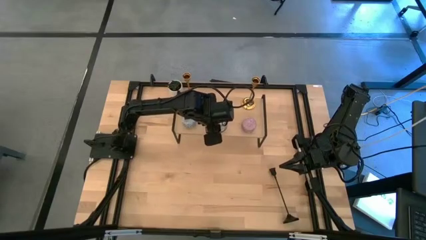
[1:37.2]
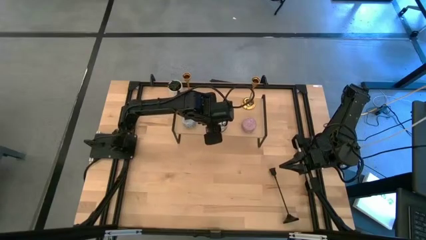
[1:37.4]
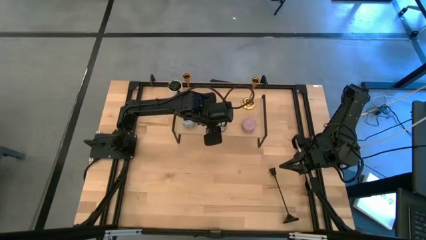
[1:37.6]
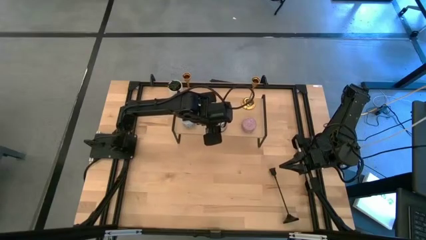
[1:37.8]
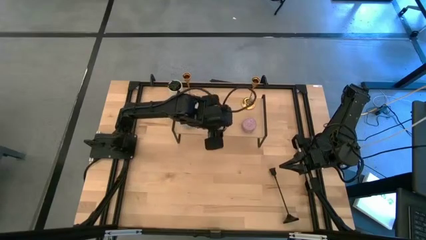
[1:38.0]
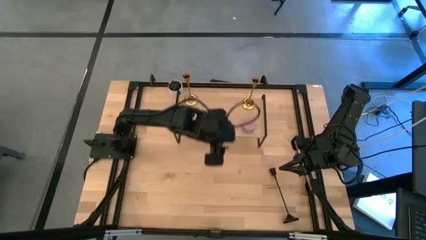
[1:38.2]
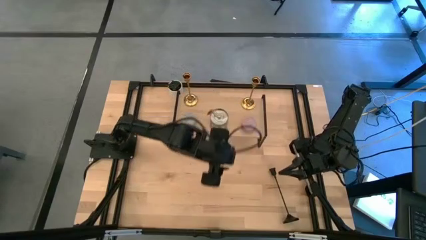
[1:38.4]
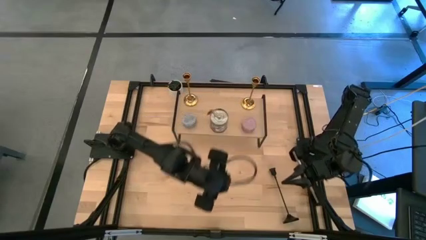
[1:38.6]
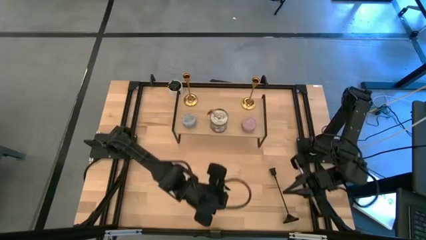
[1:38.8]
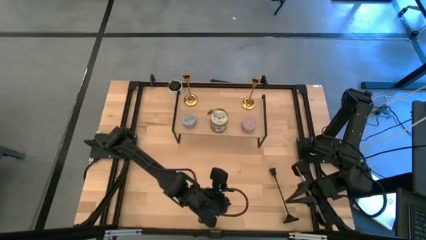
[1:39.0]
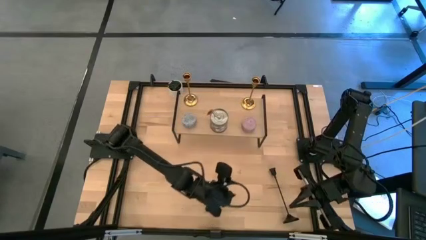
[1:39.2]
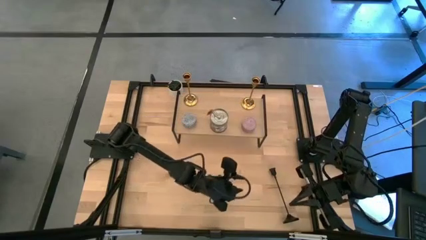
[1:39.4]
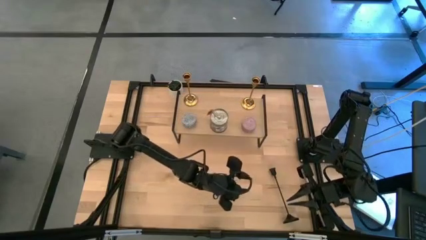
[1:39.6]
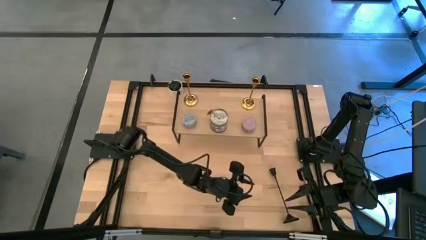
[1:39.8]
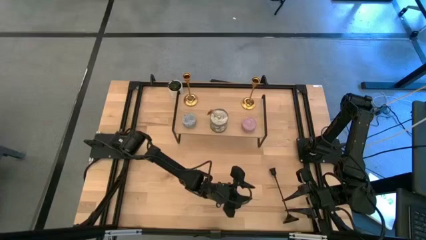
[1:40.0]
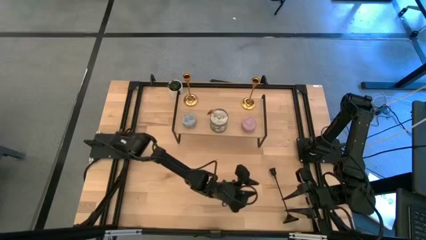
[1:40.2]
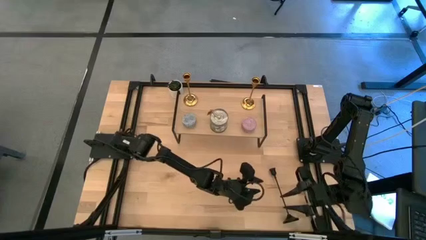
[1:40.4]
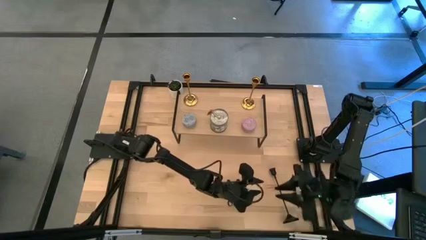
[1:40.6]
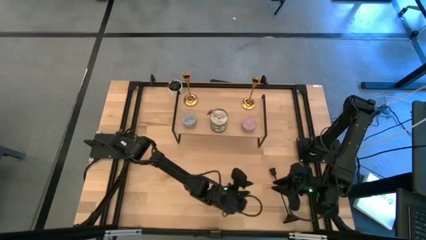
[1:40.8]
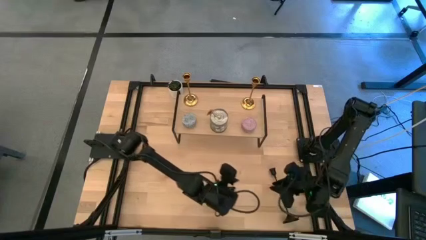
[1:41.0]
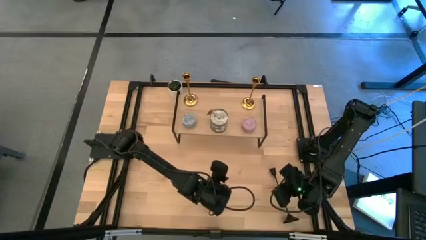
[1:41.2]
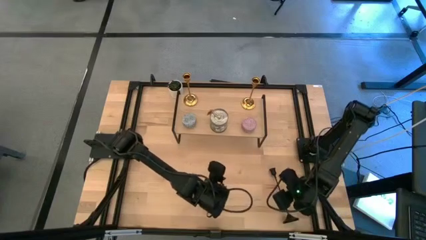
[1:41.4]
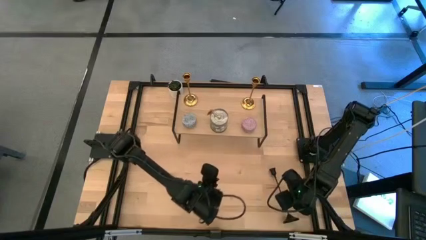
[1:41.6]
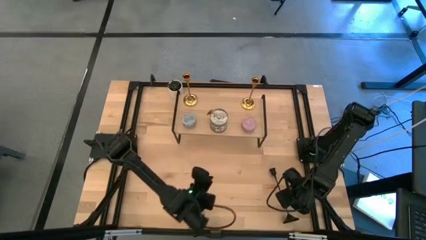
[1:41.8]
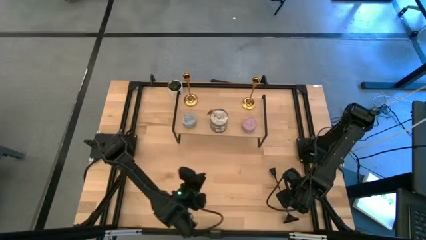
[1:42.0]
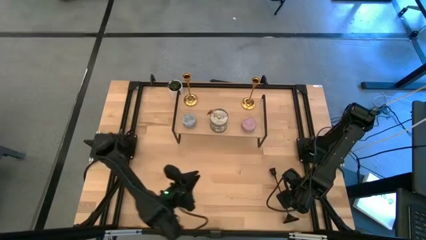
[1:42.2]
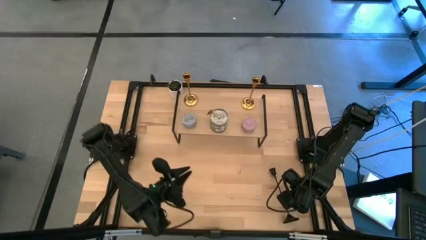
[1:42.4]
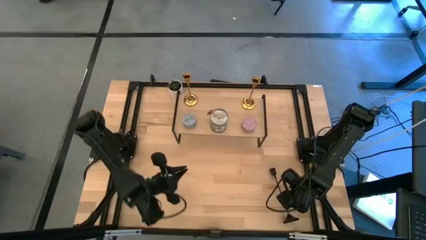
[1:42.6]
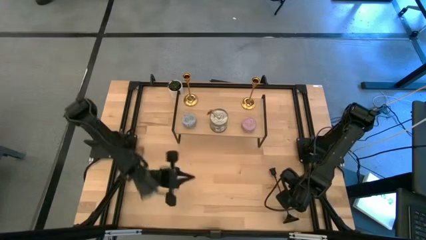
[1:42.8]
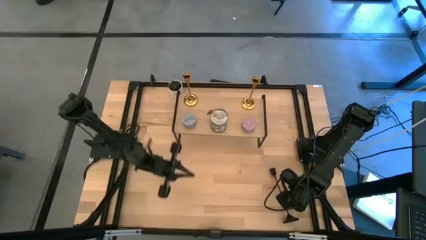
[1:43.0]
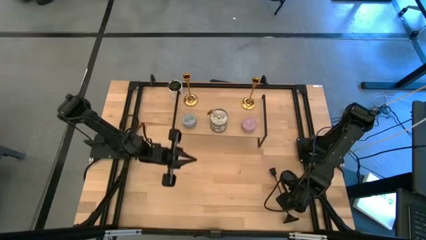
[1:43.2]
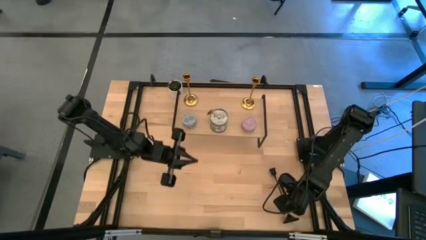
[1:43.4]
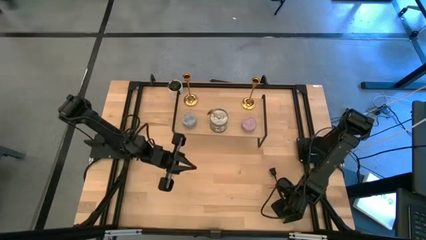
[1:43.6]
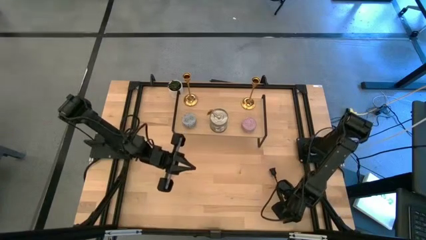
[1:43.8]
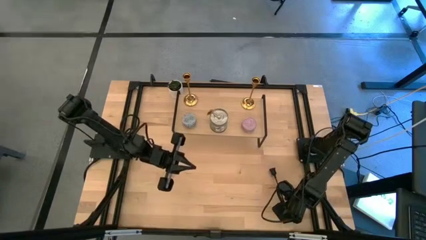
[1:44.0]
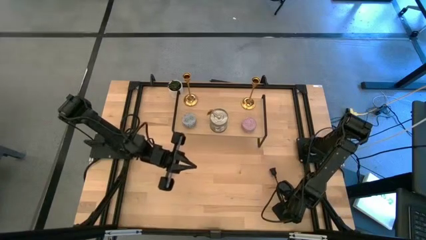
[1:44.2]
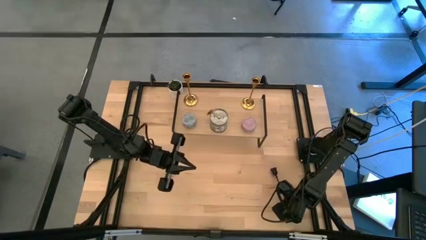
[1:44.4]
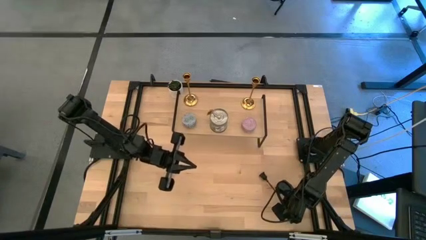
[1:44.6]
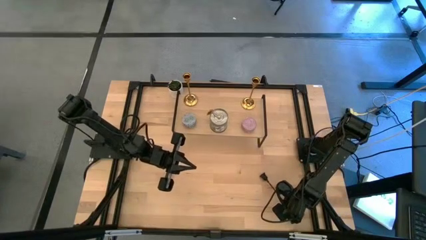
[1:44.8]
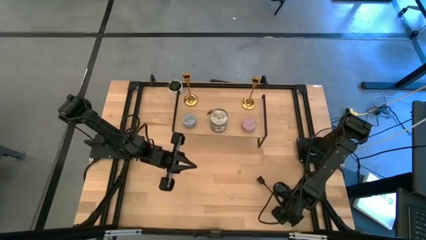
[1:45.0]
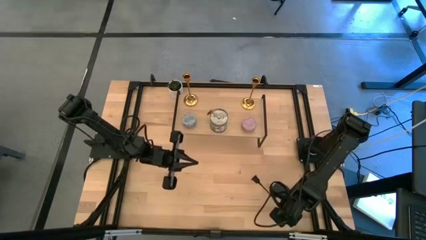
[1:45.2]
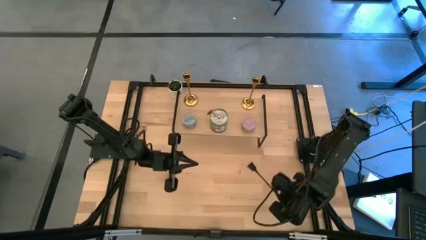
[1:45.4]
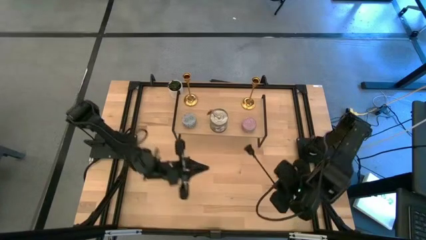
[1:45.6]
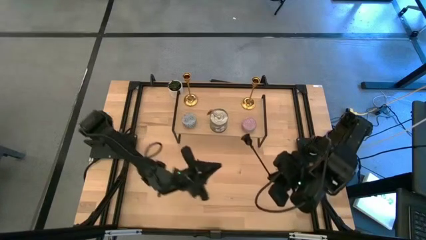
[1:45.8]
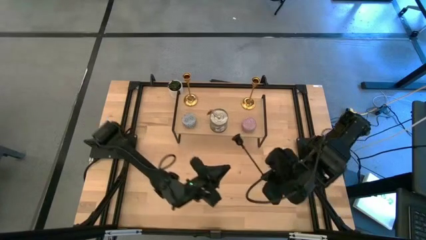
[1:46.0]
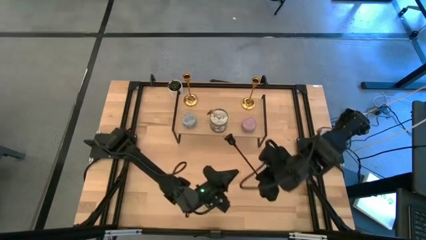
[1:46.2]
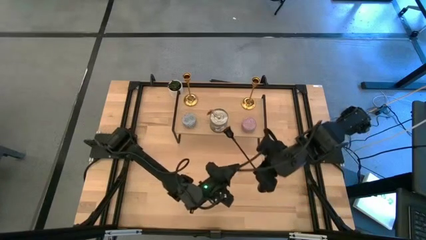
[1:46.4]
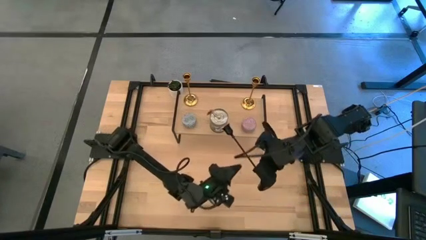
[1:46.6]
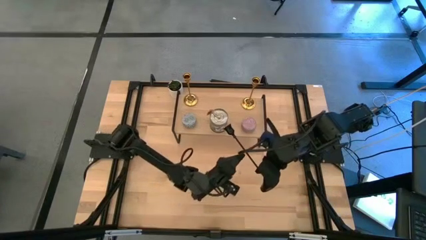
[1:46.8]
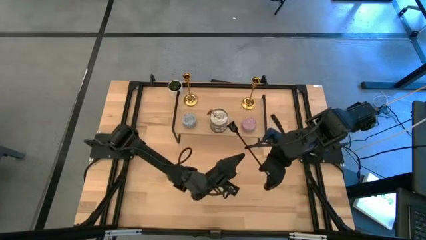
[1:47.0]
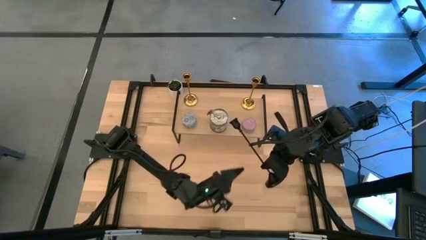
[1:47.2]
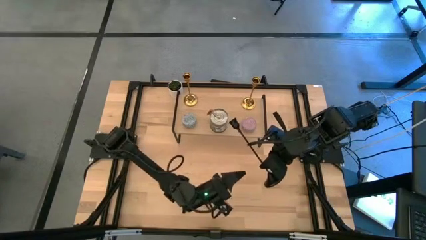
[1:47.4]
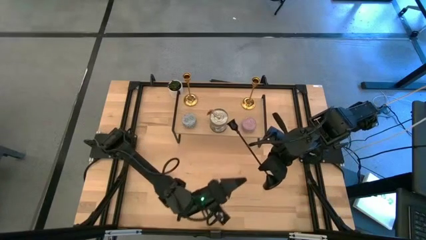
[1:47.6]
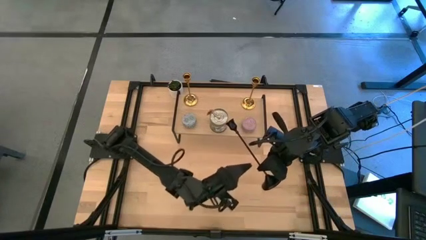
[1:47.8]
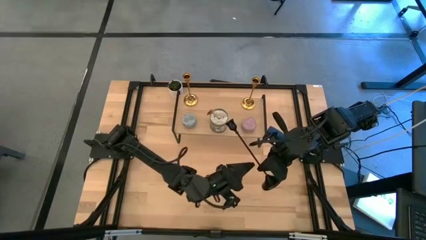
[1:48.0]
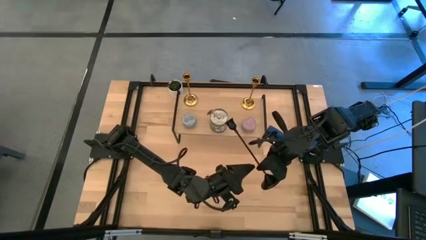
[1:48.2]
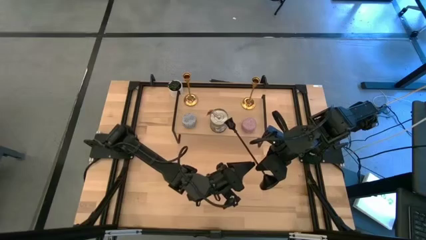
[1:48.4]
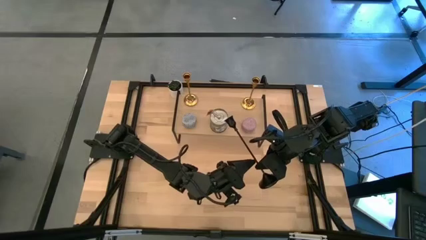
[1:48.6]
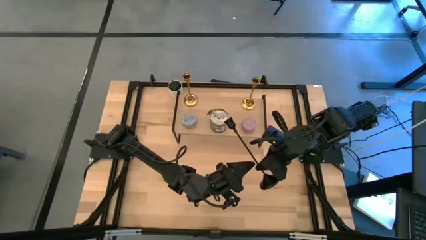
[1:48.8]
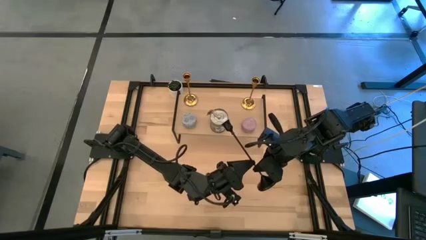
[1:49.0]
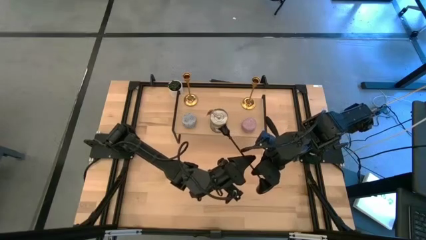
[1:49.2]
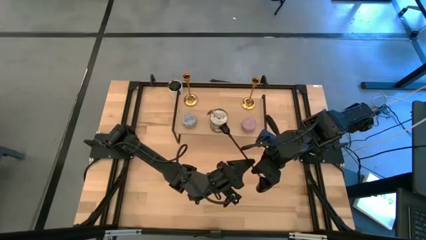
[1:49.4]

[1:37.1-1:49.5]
Task: Pick & Place candle stick holders
Put the black candle holder on the shelf
